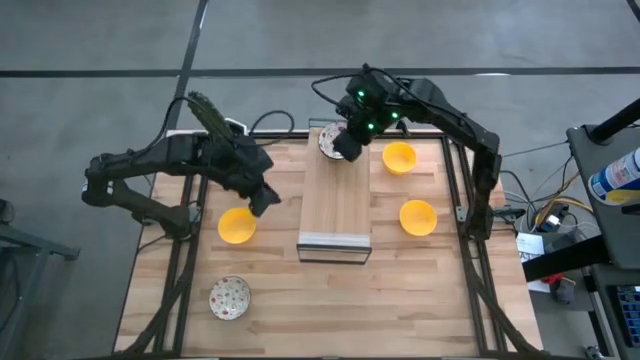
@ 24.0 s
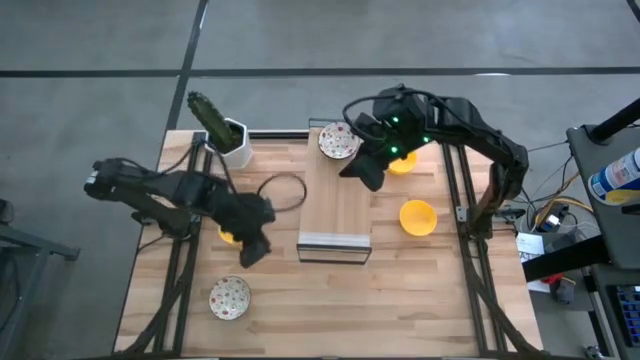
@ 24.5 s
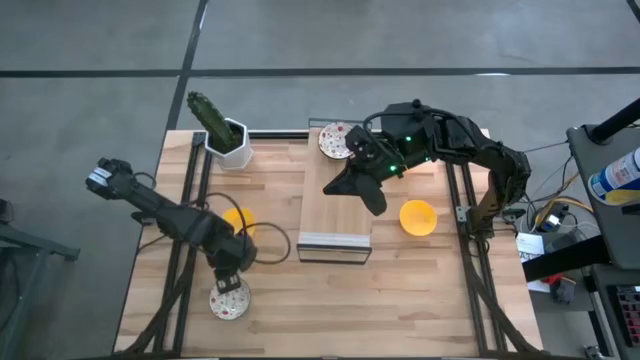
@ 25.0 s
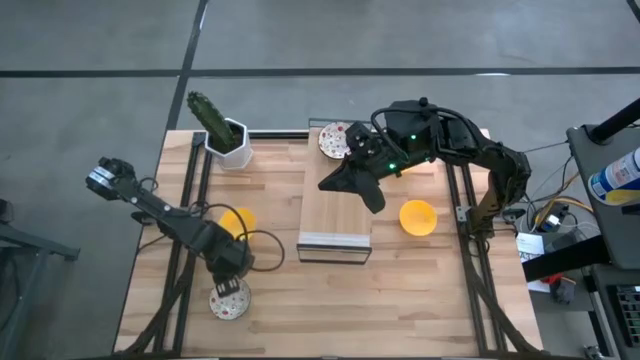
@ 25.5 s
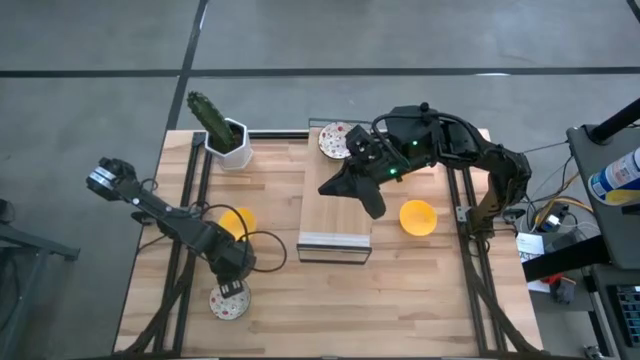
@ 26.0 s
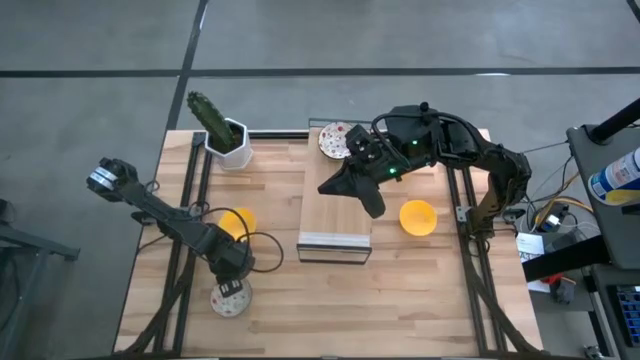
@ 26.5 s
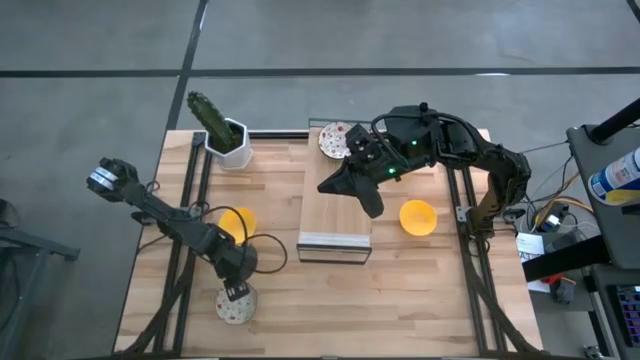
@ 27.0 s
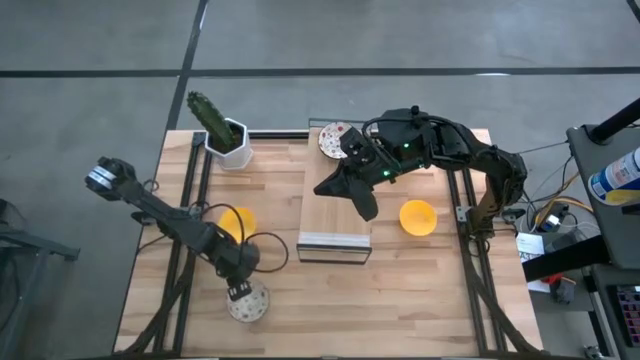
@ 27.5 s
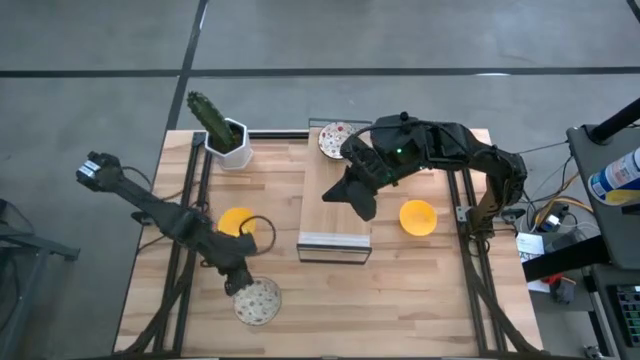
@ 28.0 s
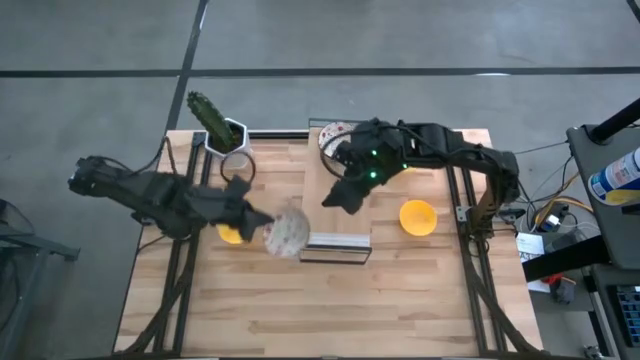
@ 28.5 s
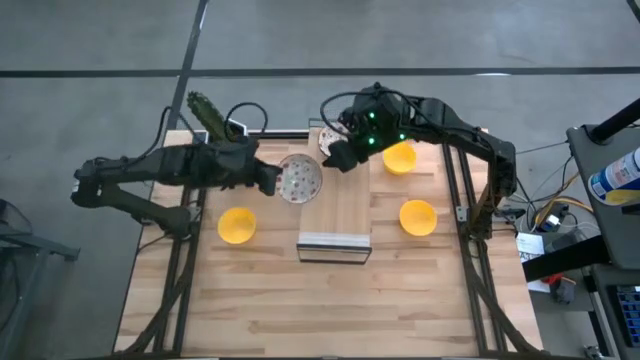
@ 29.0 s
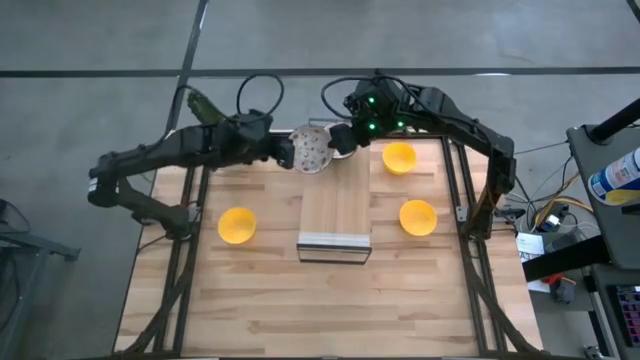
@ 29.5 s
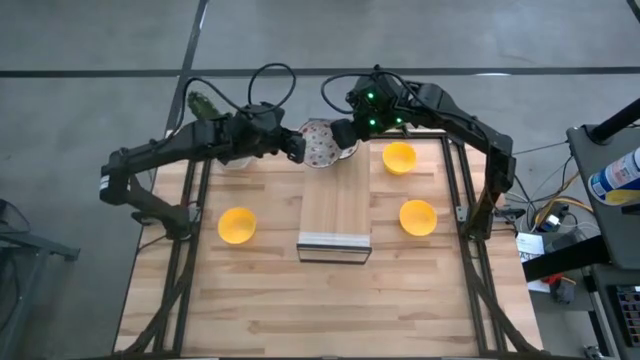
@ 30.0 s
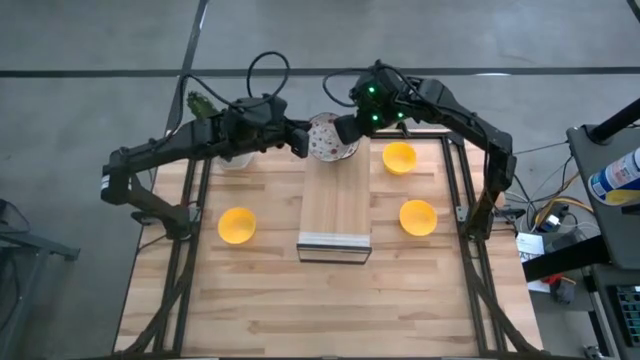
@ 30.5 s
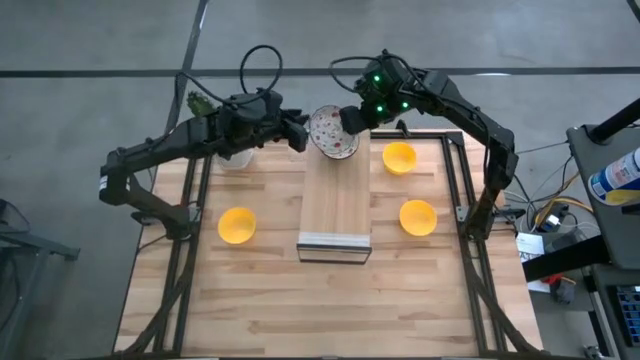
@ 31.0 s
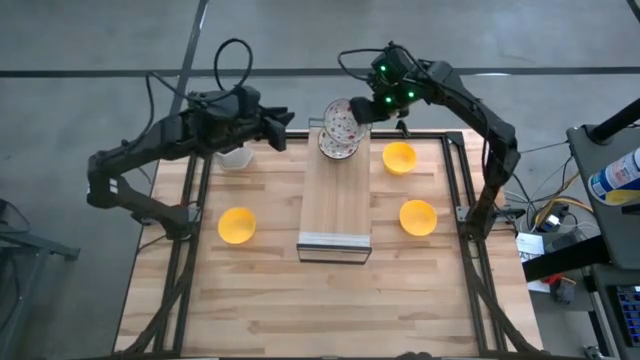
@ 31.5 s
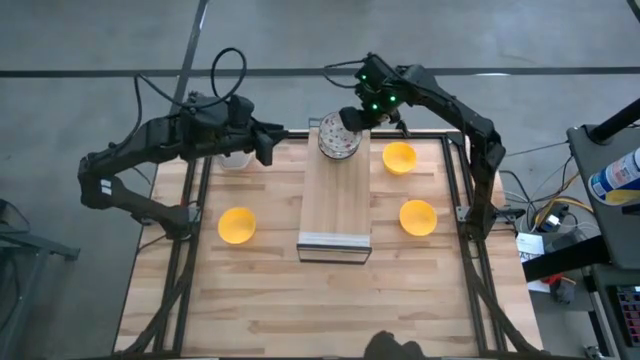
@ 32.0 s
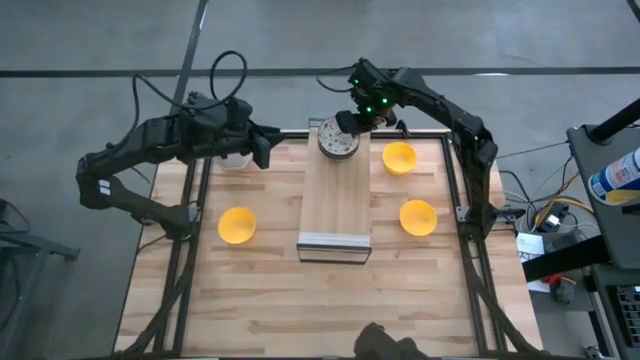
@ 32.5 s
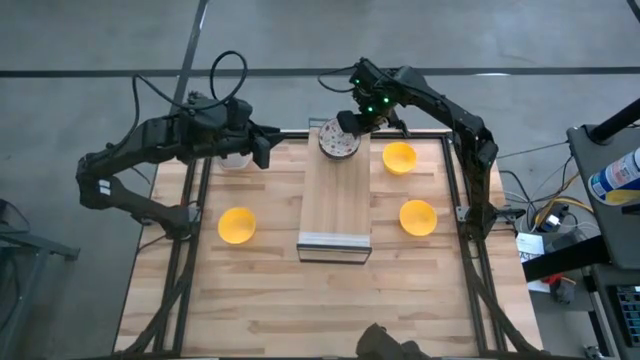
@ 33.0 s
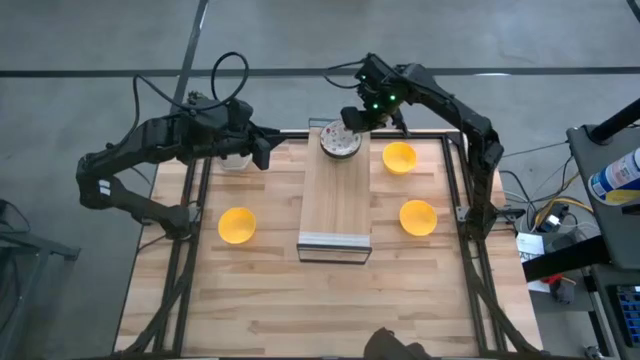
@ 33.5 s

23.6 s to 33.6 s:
Task: Pick & Place Mini bowls
Stack the white bowl on top of the other white bowls on the shelf

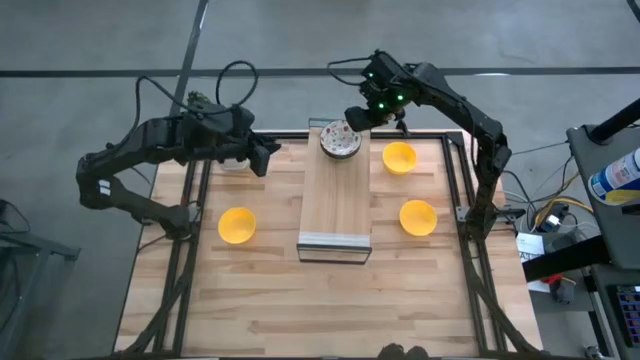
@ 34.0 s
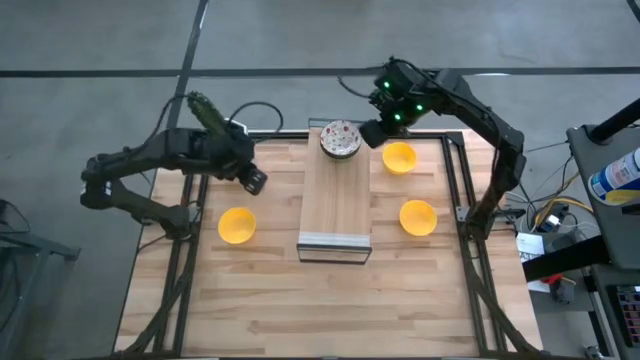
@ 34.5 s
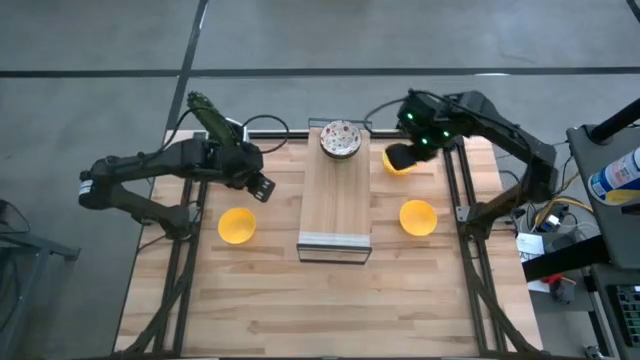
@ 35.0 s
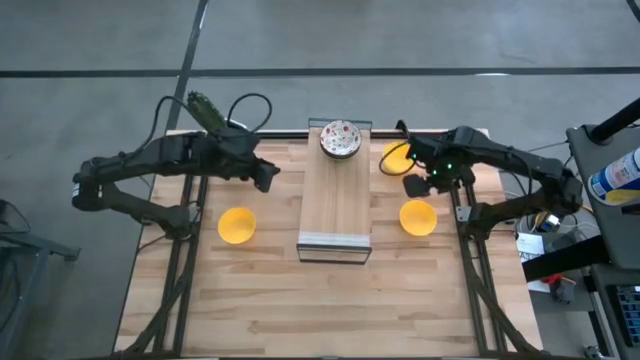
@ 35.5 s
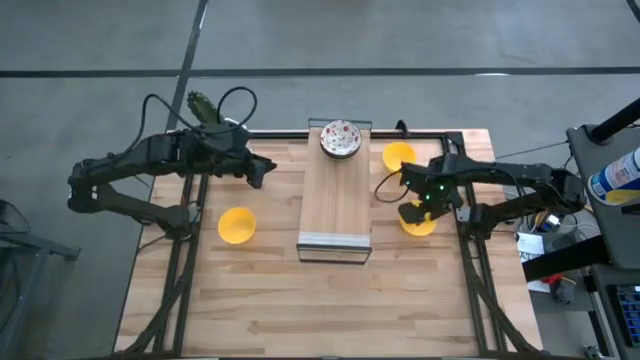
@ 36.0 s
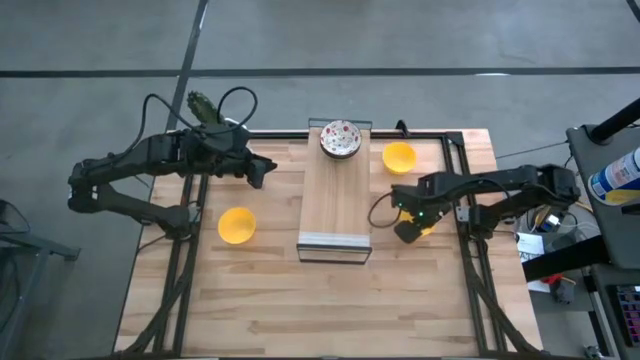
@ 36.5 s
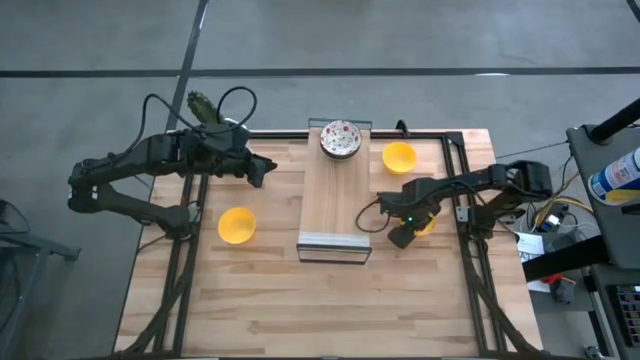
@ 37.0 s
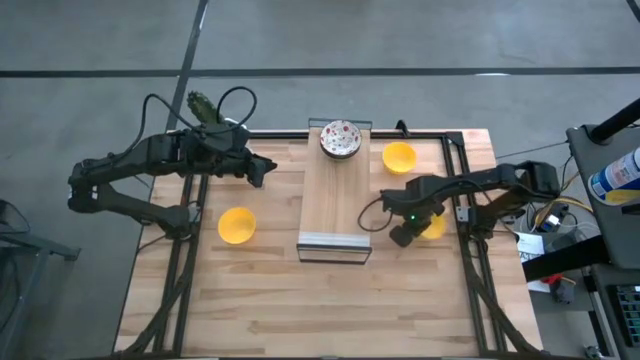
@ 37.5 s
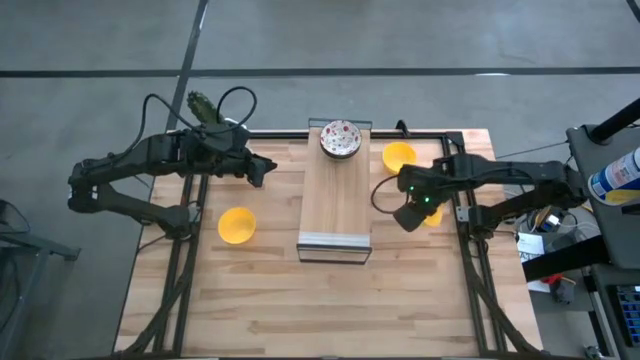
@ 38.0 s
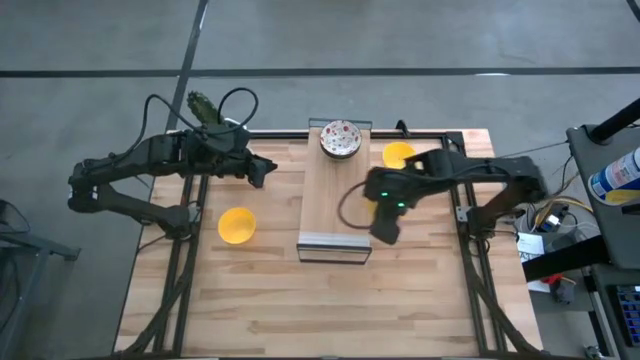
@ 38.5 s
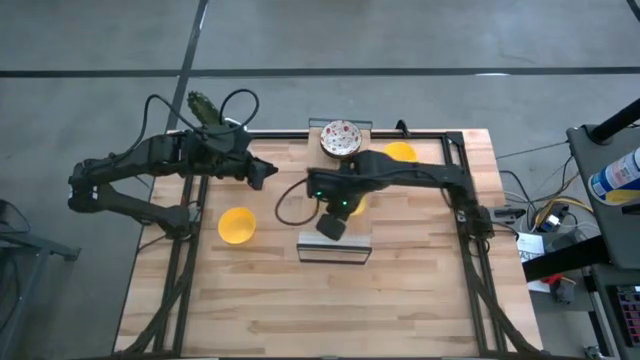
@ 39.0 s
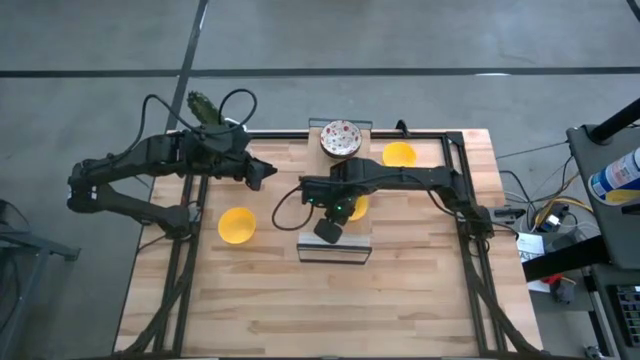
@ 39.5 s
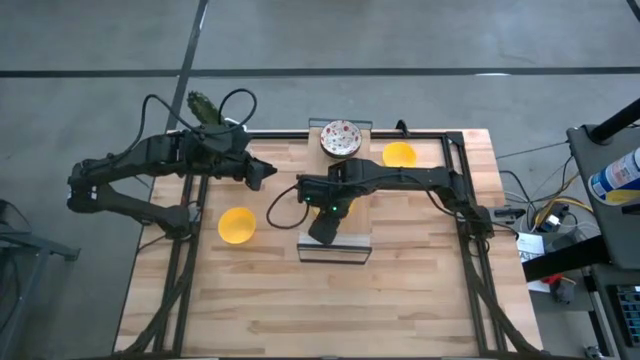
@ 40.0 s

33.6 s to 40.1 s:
Put the bottom right yellow bowl on the shelf

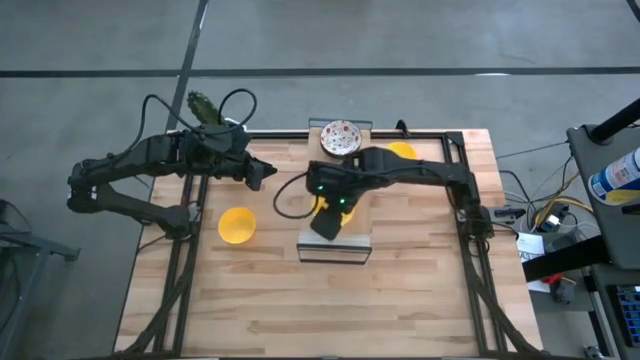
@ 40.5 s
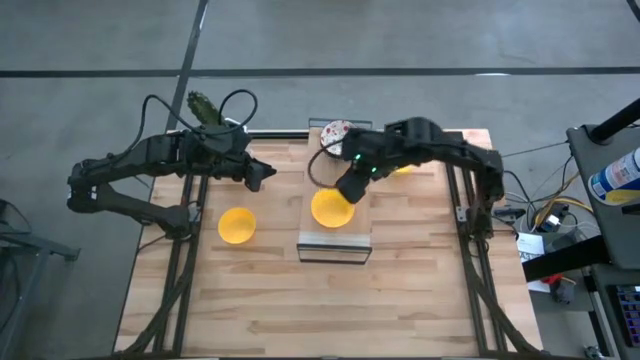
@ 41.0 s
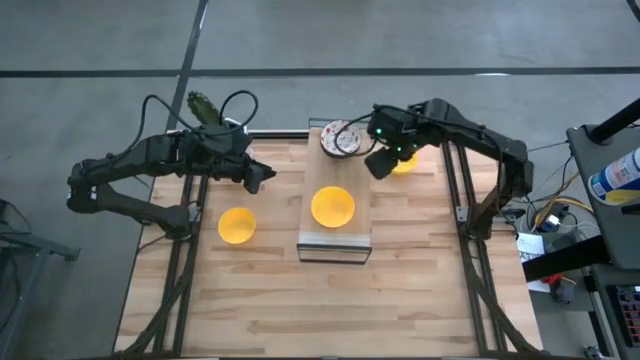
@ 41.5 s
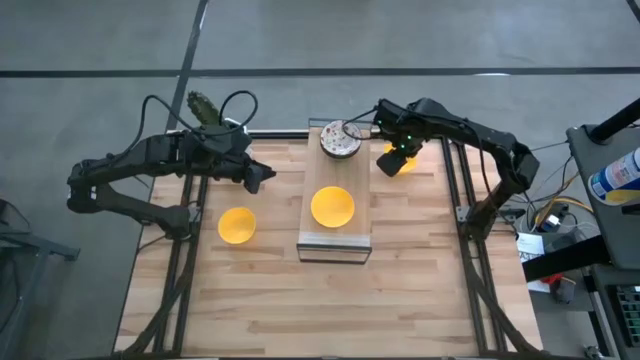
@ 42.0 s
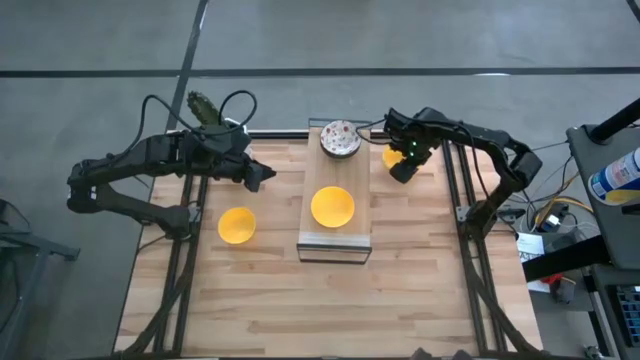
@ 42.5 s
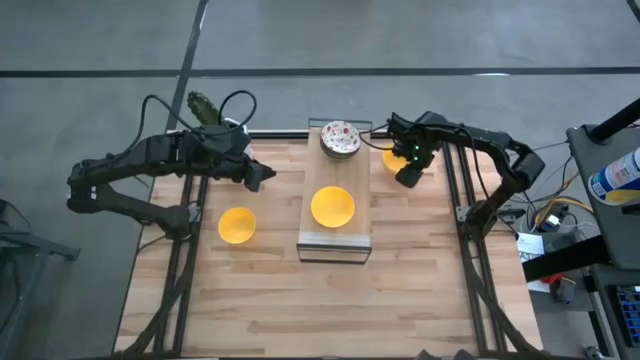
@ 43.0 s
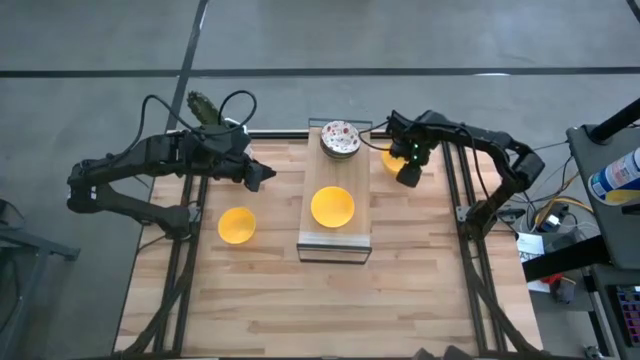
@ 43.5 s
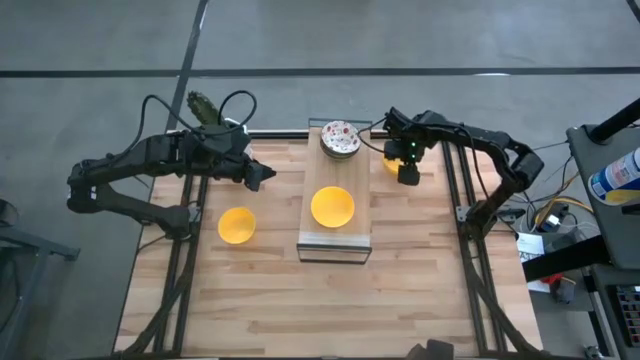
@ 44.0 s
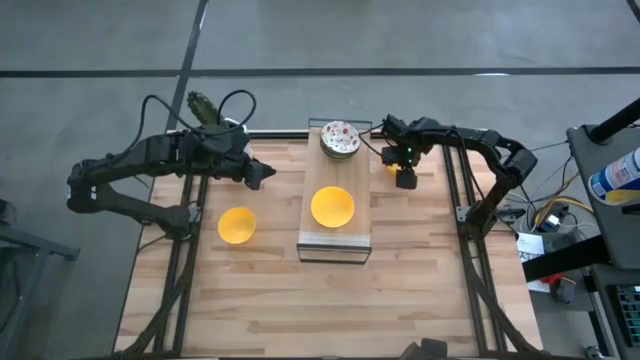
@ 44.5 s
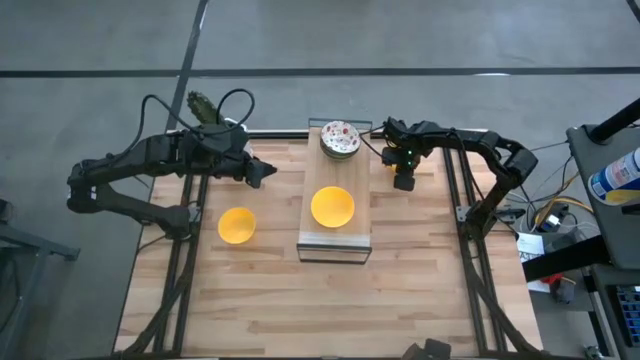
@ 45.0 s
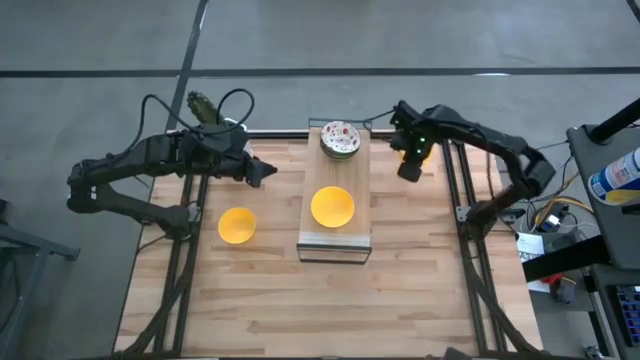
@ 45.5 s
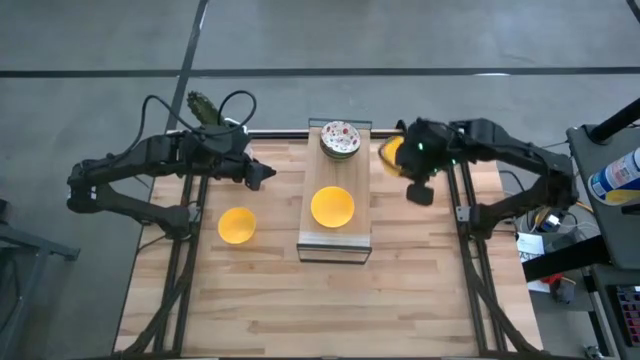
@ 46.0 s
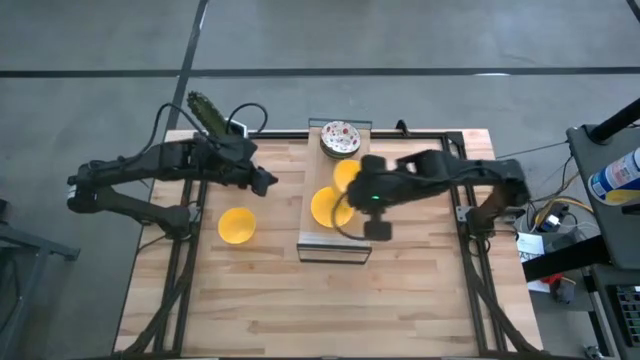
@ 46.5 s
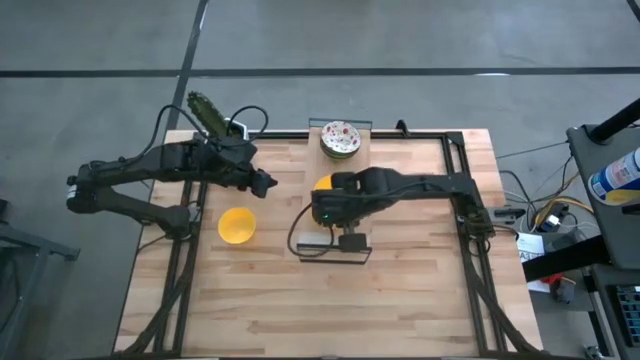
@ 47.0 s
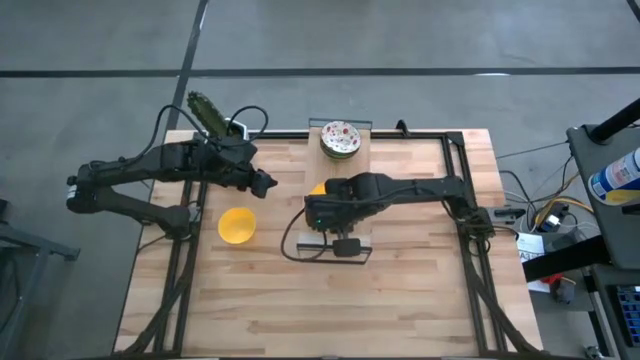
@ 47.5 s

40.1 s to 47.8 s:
Stack the right yellow bowl on top of the other yellow bowl on the shelf
